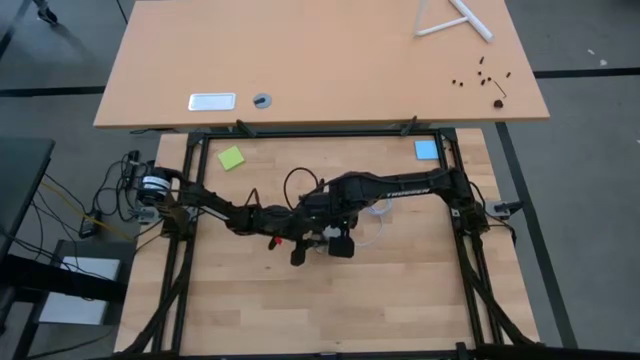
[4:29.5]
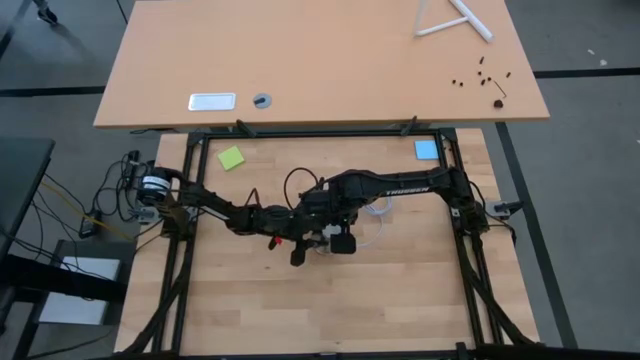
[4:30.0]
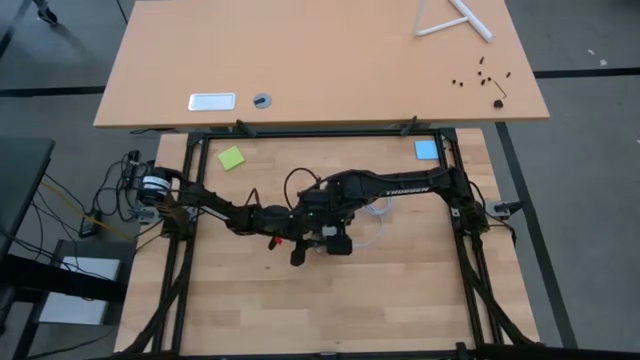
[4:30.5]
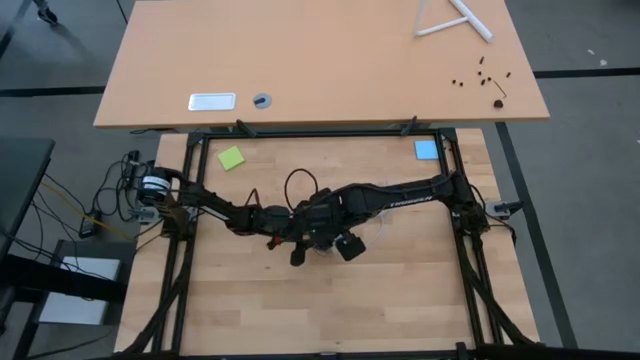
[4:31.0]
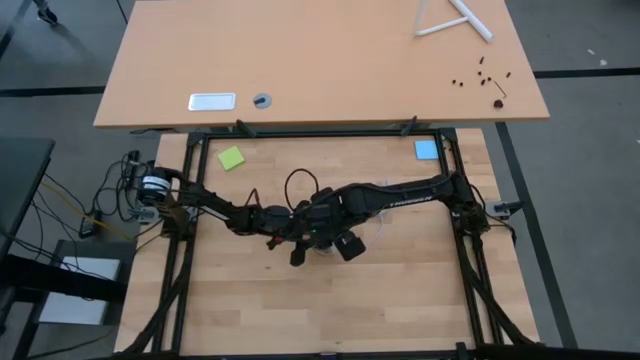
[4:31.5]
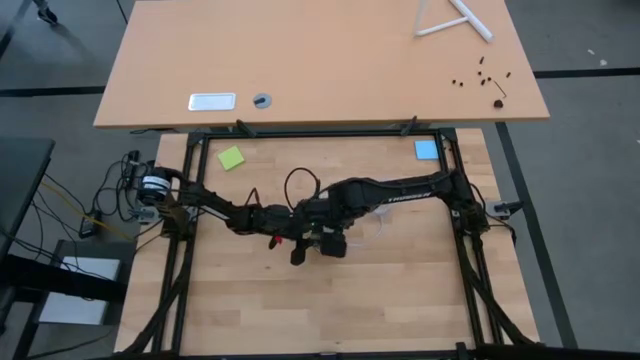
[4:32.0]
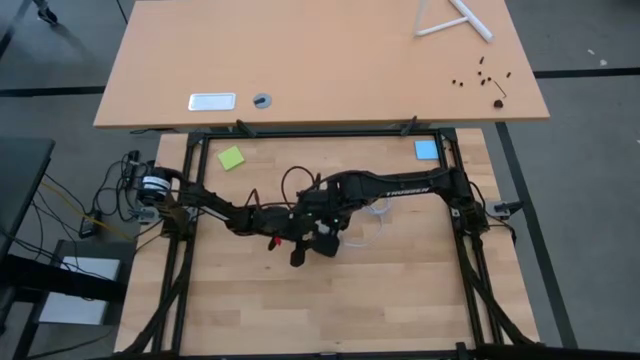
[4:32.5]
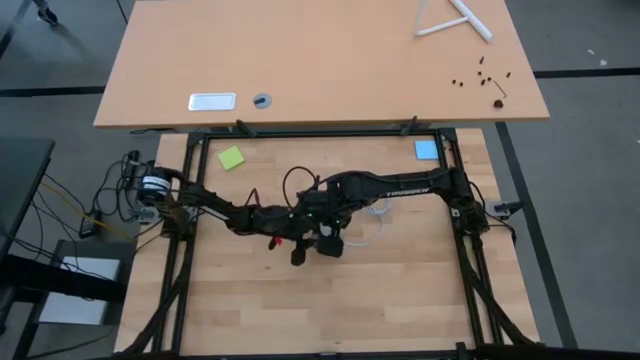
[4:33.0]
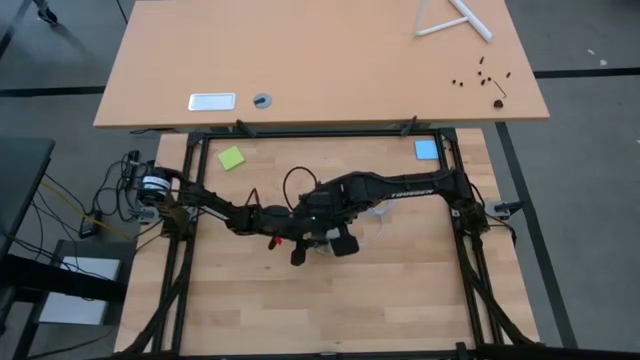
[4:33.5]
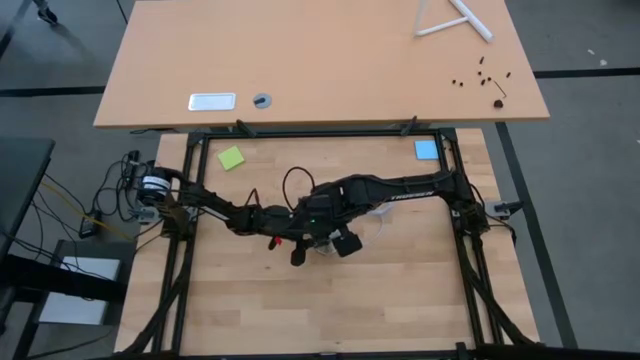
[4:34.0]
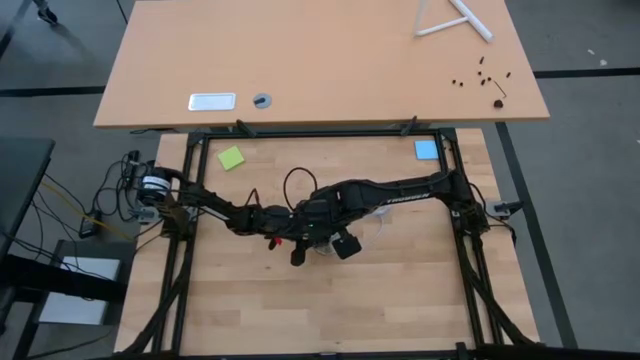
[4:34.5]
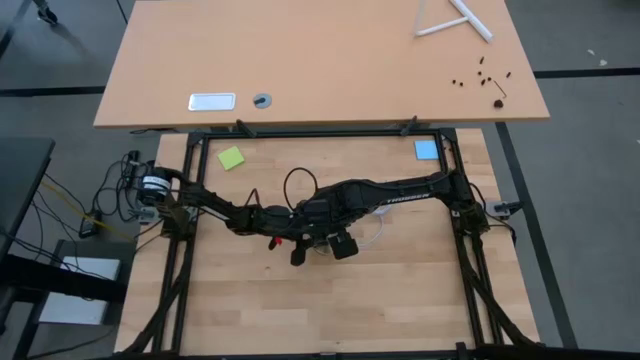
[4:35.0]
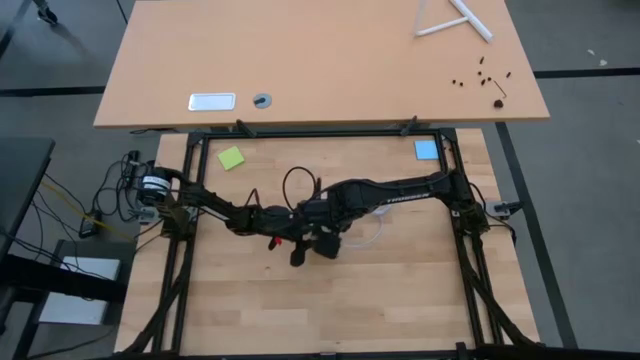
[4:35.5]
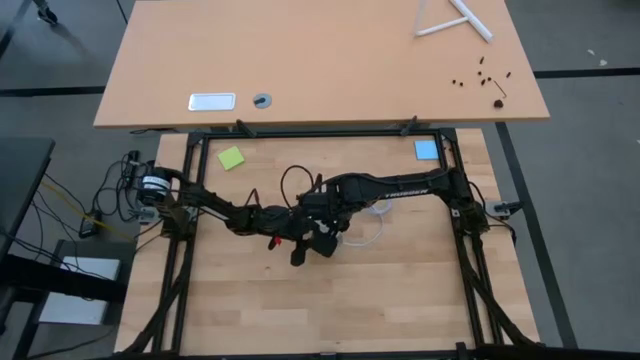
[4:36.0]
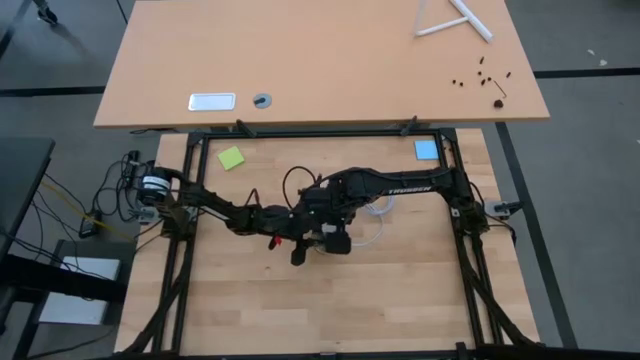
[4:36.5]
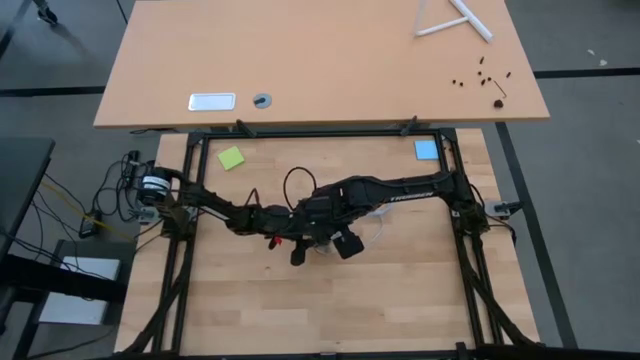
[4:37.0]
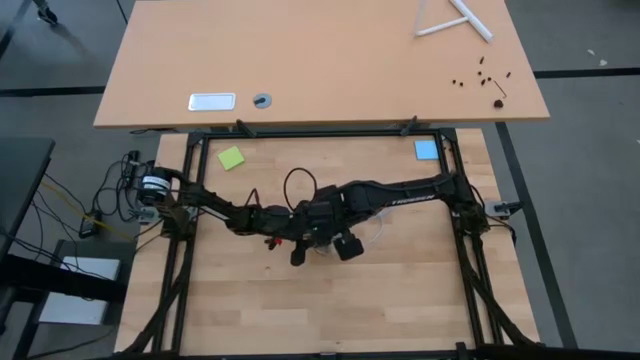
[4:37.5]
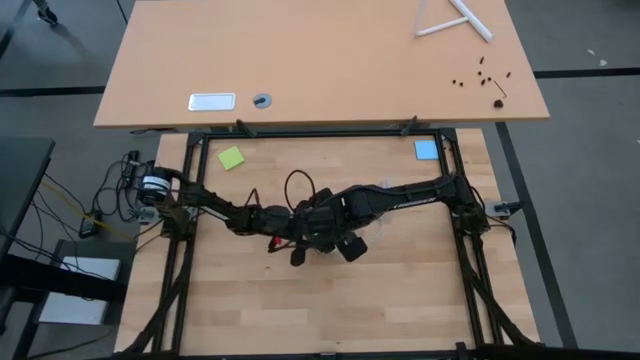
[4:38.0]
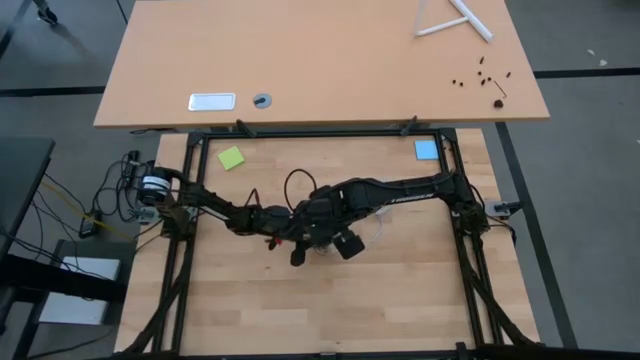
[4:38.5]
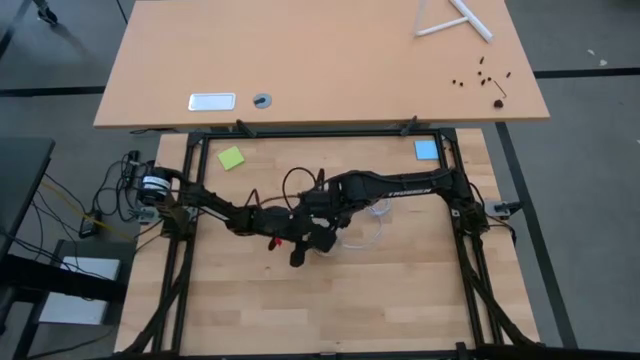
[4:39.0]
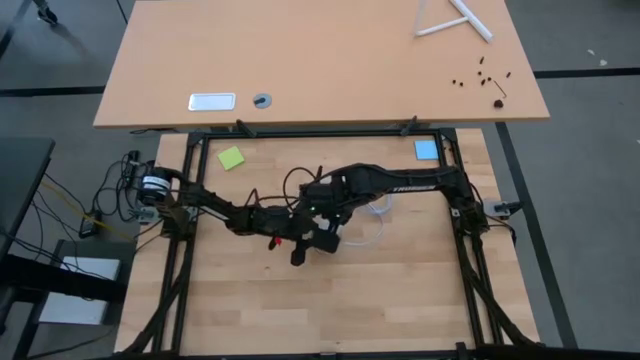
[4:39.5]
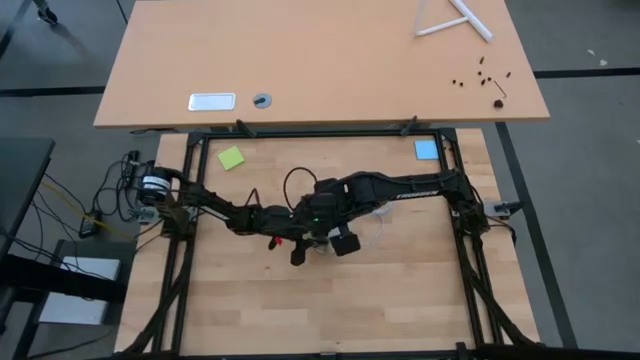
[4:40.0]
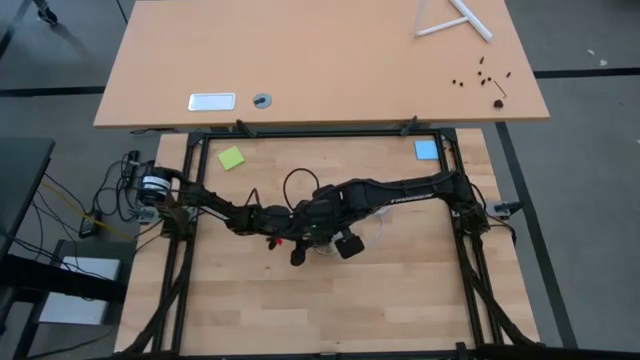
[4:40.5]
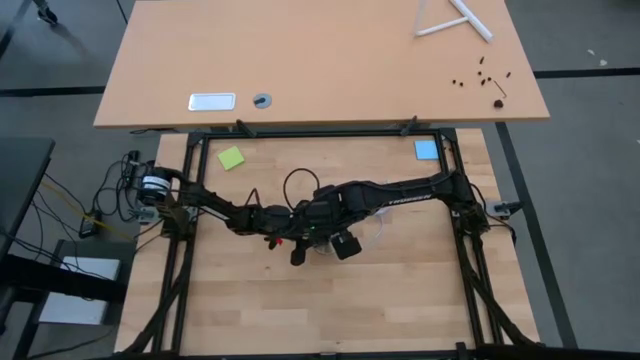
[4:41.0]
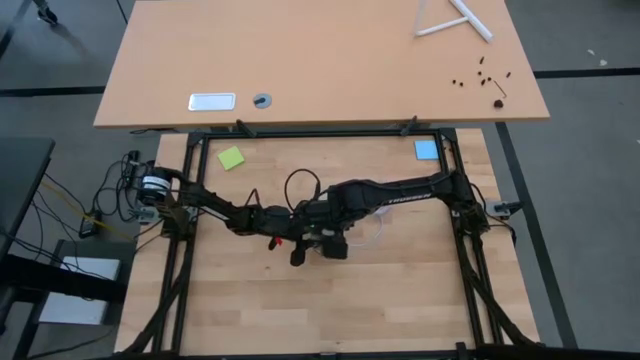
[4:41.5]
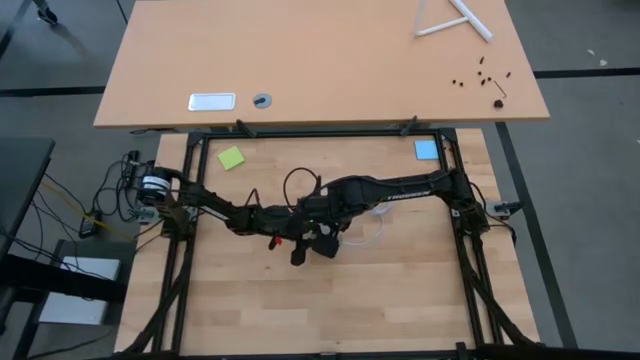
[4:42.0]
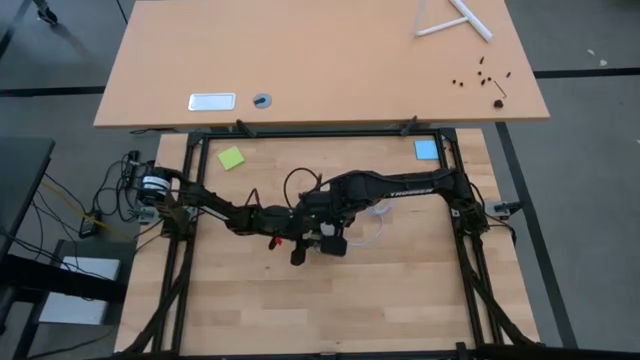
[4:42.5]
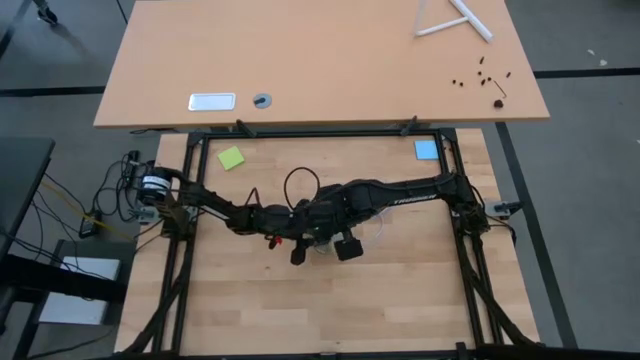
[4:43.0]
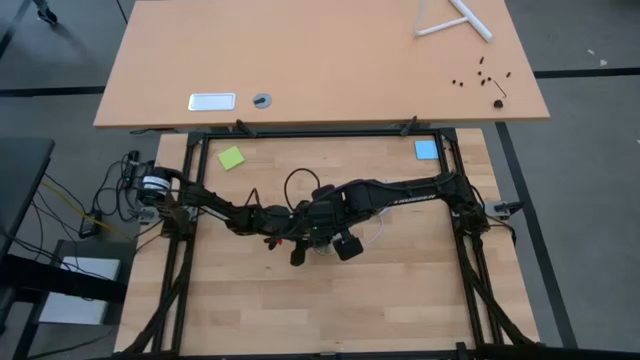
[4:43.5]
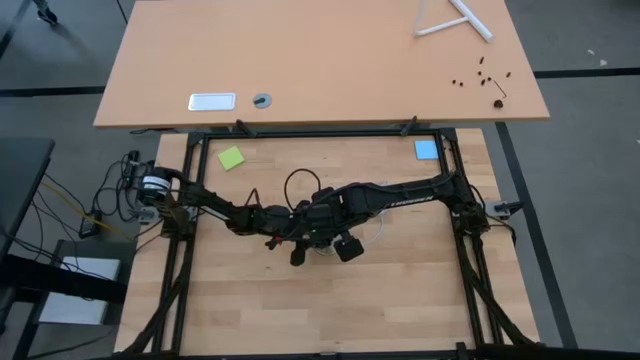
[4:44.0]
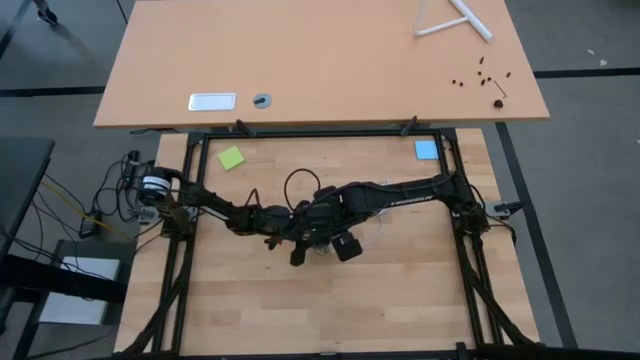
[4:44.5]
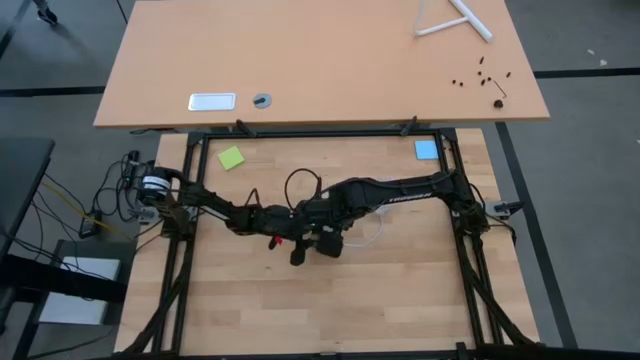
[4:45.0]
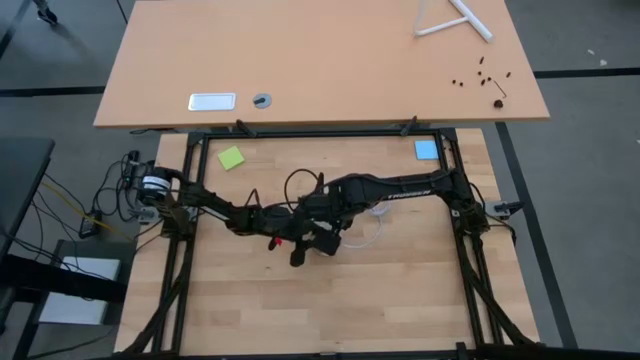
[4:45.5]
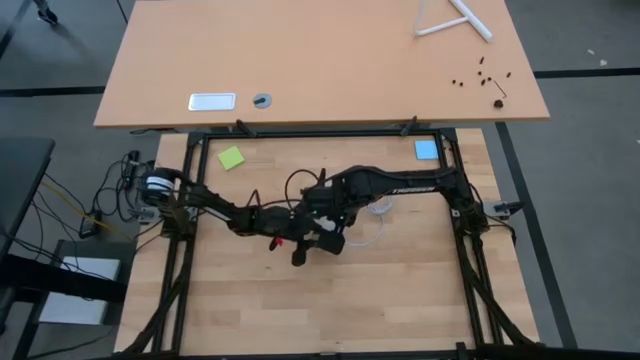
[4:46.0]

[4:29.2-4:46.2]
Task: Screw lightbulb
Insert the lightbulb into the lamp

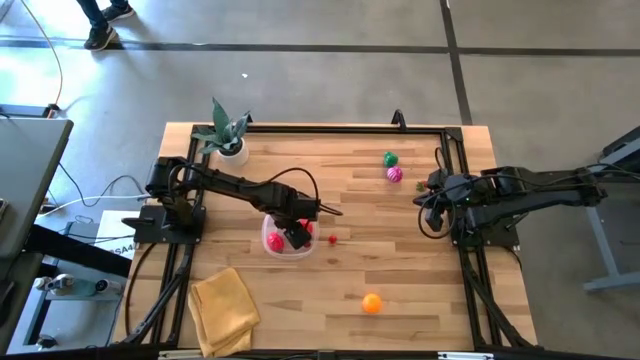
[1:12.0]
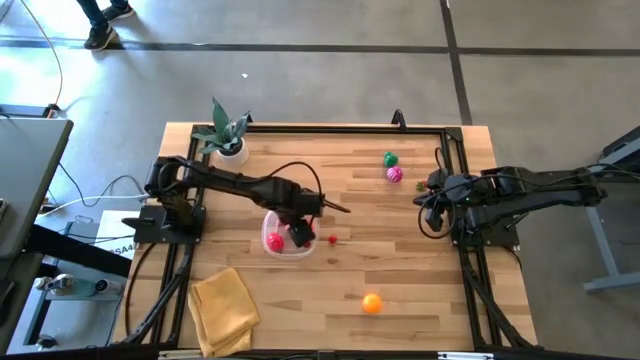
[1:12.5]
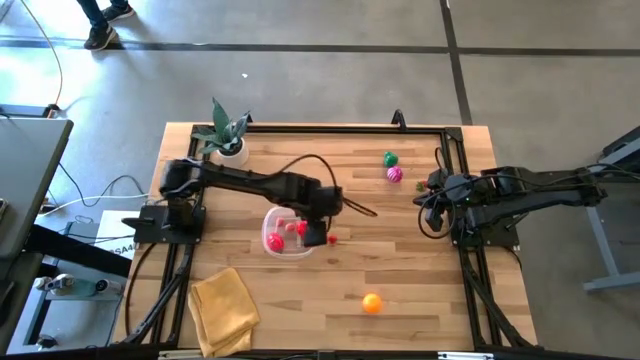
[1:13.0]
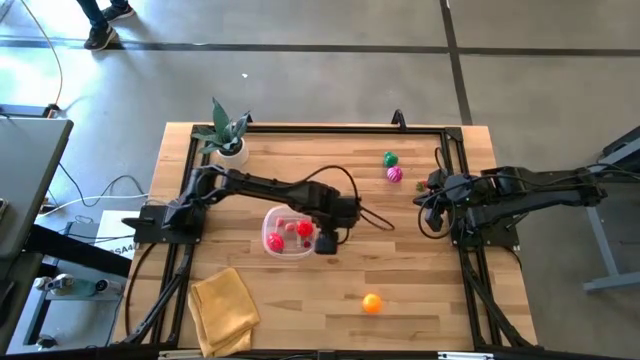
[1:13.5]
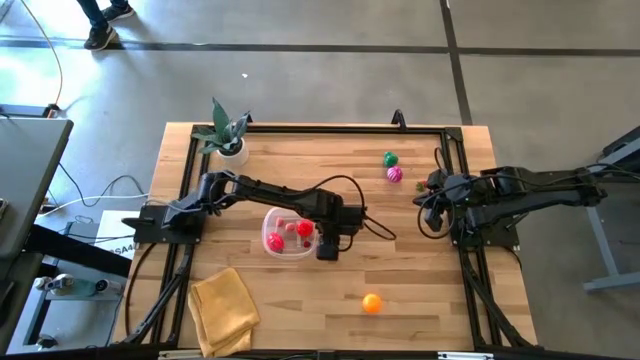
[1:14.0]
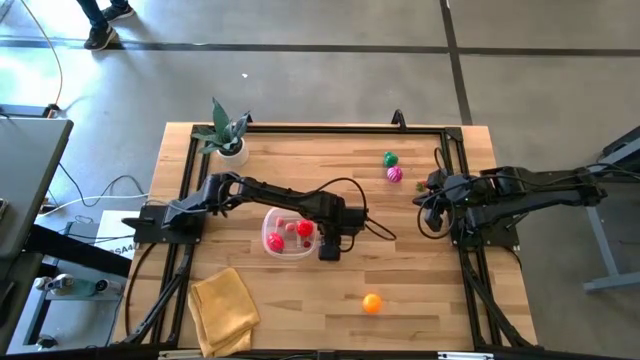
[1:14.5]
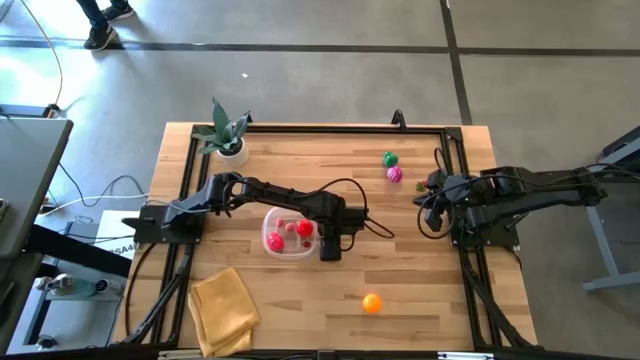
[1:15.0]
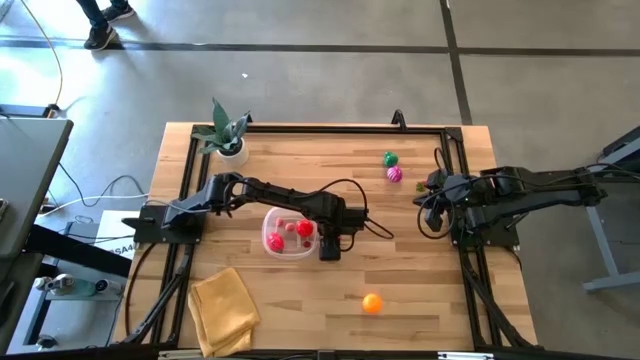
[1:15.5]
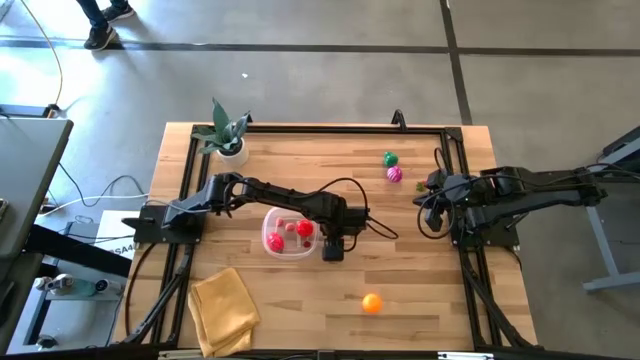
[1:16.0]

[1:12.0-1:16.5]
Task: Pick and placing Produce into tupperware
Put the red cherry into the transparent container
